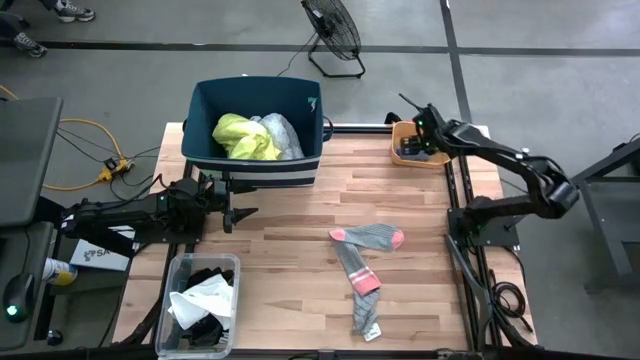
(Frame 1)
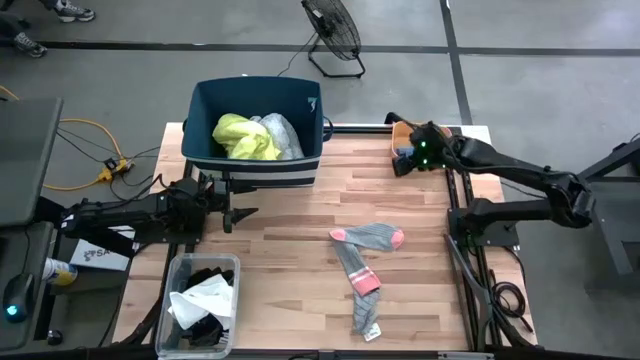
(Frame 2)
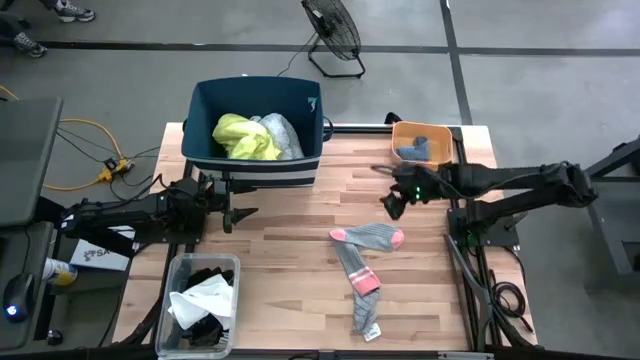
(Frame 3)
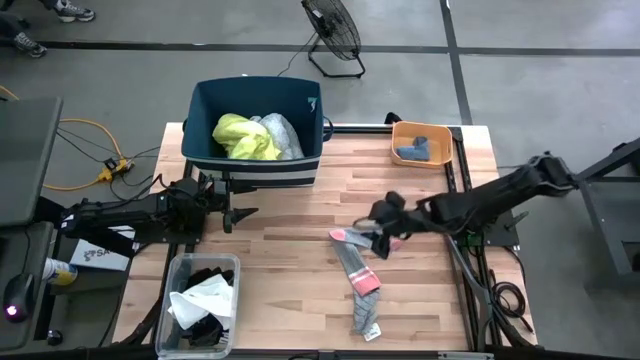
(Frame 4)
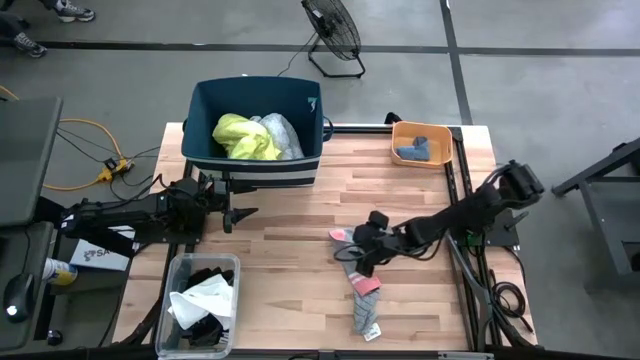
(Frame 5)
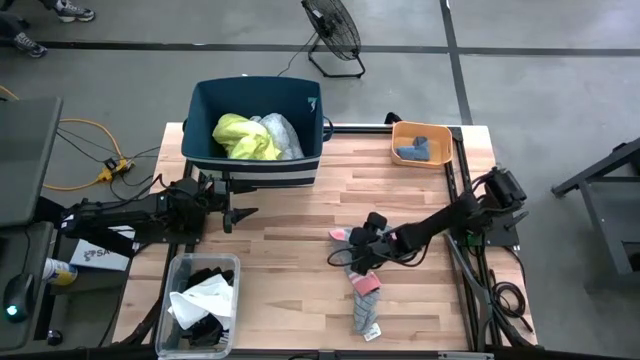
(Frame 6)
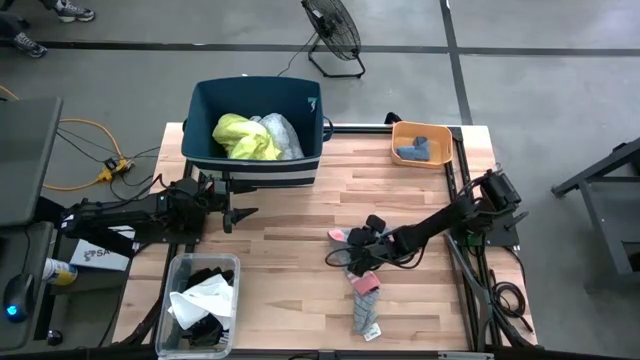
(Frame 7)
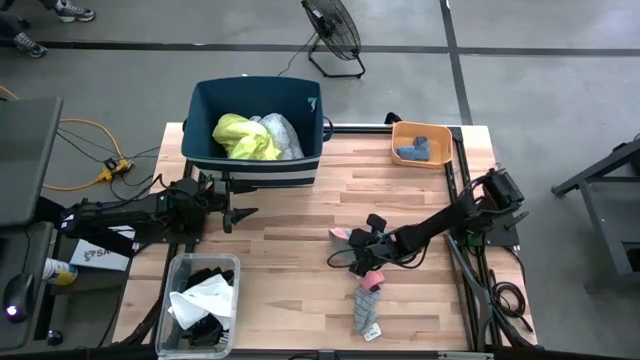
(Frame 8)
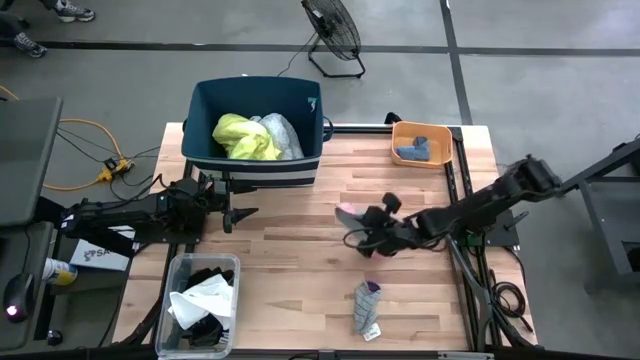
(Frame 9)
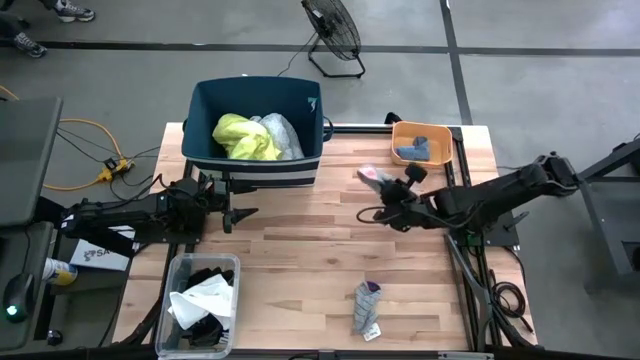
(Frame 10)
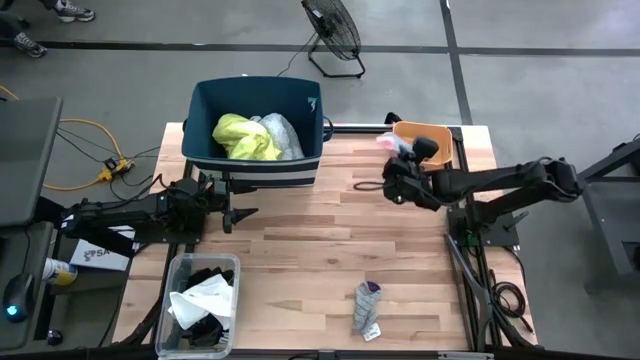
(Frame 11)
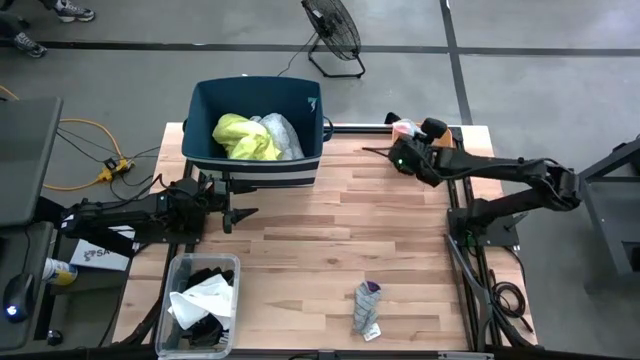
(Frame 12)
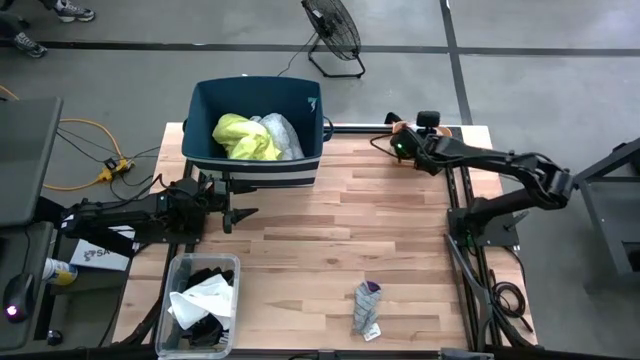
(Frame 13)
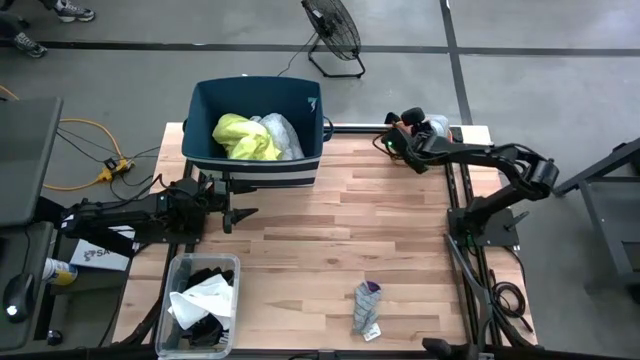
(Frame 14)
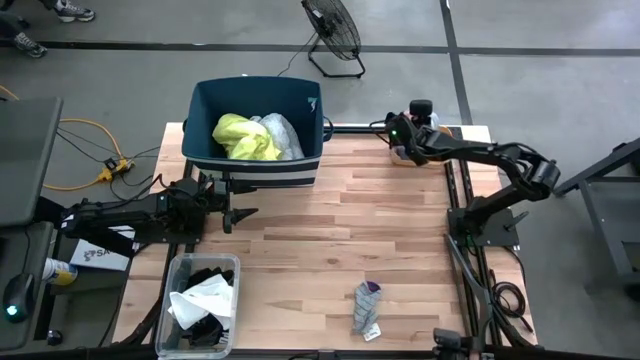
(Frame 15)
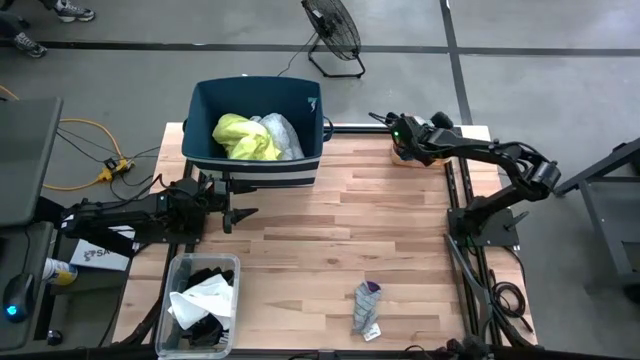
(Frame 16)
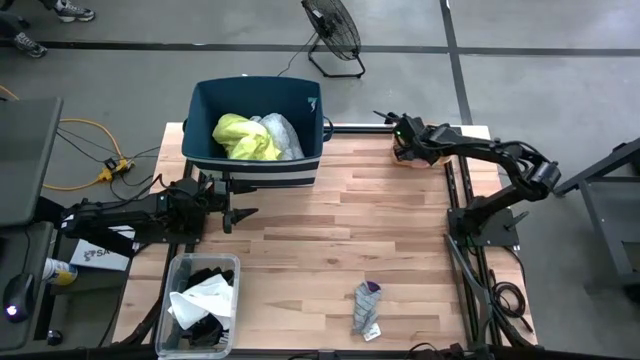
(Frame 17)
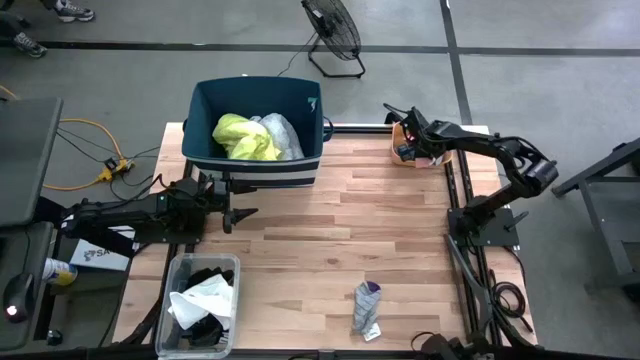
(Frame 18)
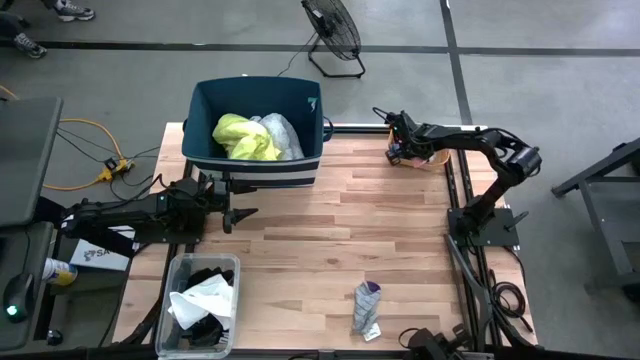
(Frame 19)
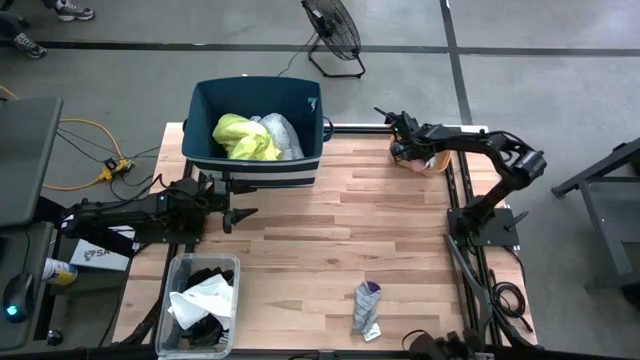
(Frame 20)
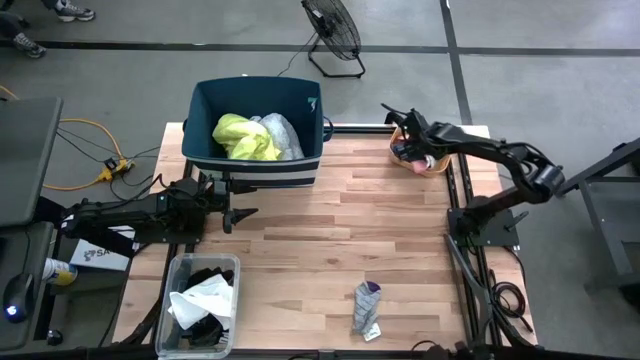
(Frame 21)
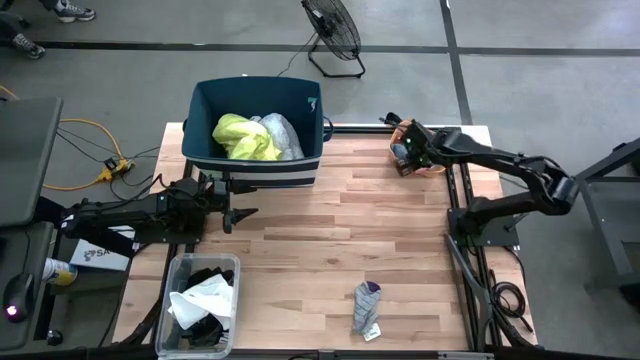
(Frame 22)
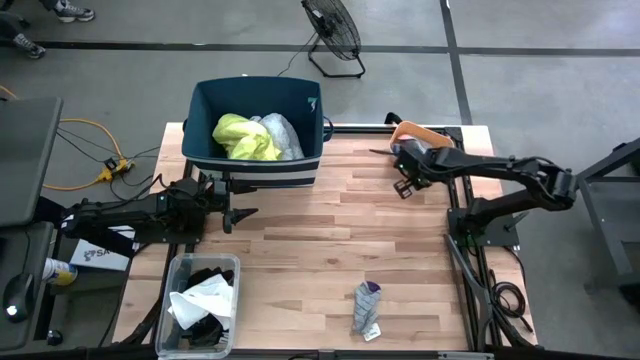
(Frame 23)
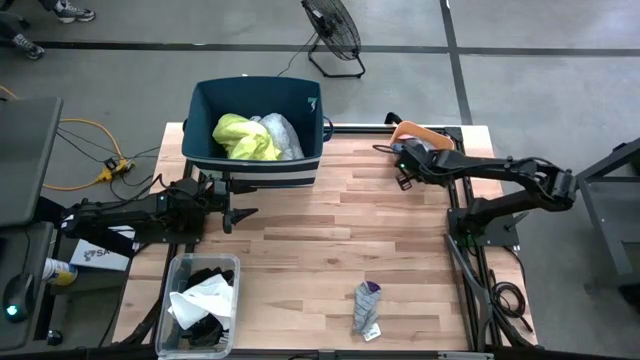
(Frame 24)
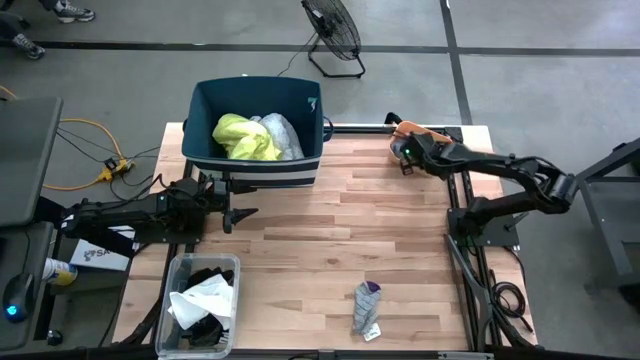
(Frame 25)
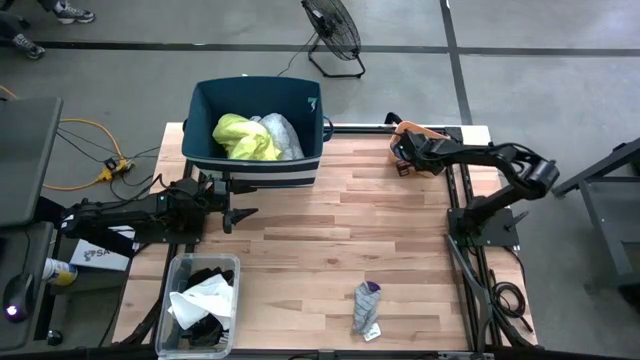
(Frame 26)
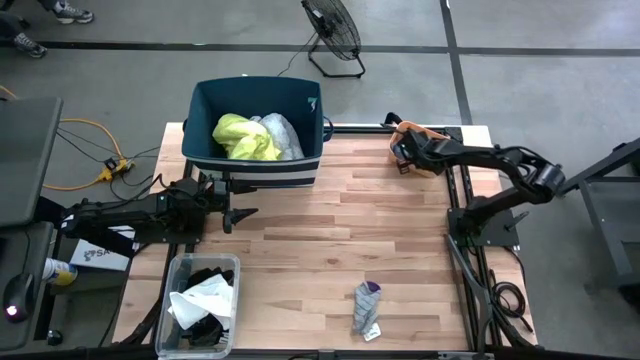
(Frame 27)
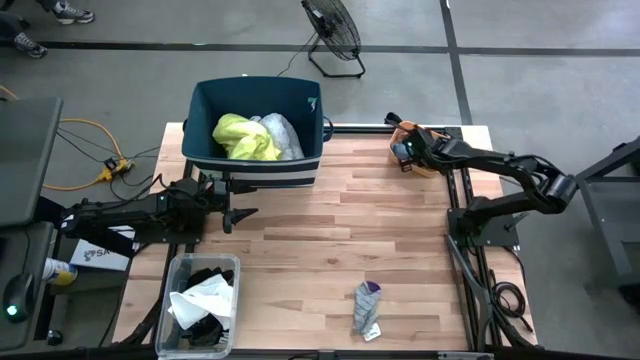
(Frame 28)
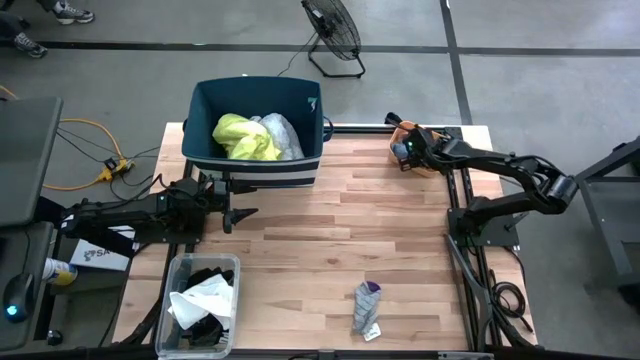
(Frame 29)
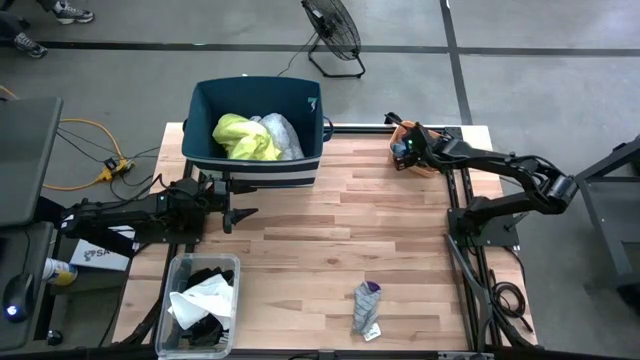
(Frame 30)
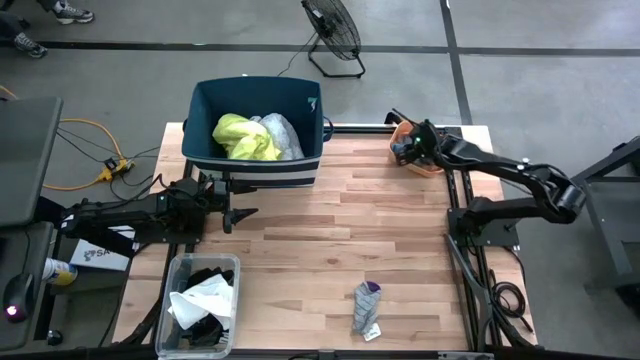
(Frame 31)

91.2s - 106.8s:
Task: Pick & Place Cloths
Put the pink sock into the orange bin

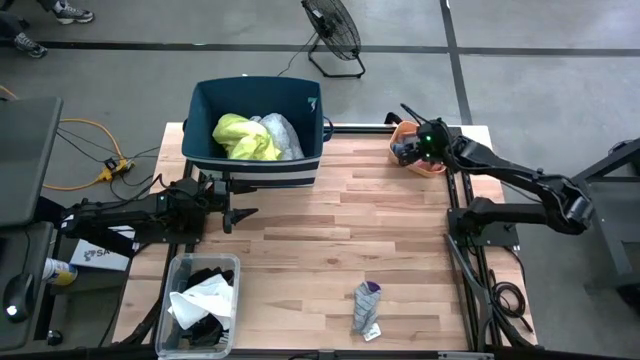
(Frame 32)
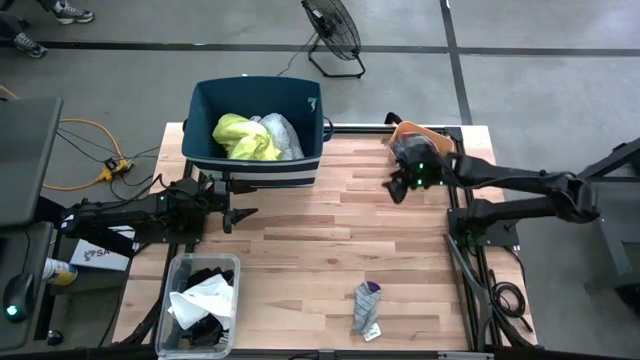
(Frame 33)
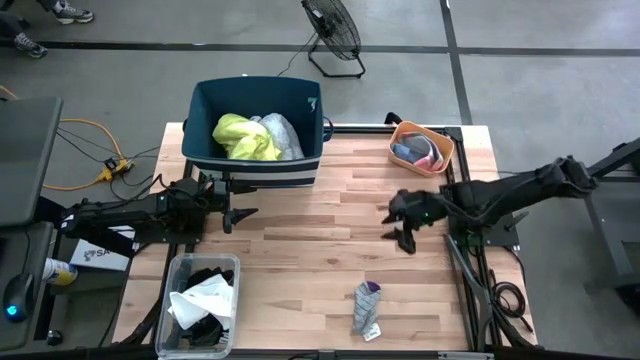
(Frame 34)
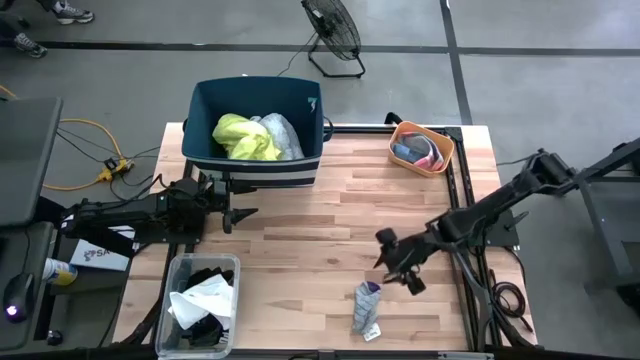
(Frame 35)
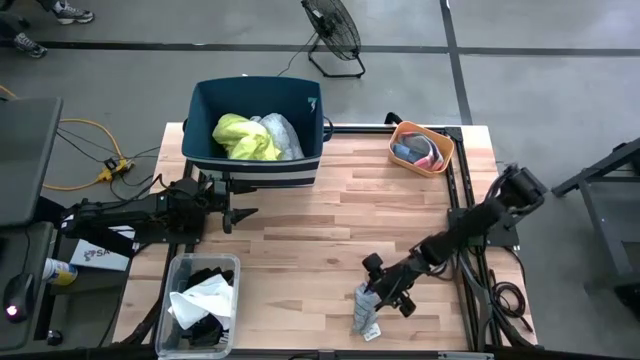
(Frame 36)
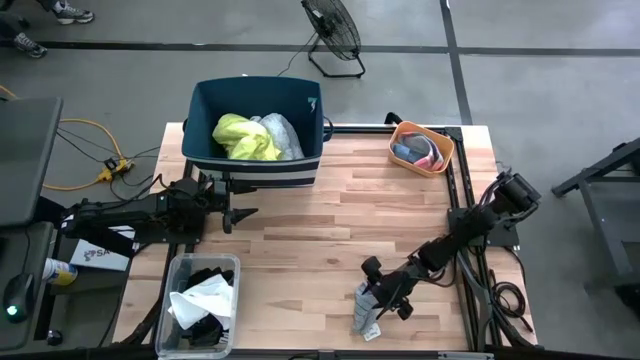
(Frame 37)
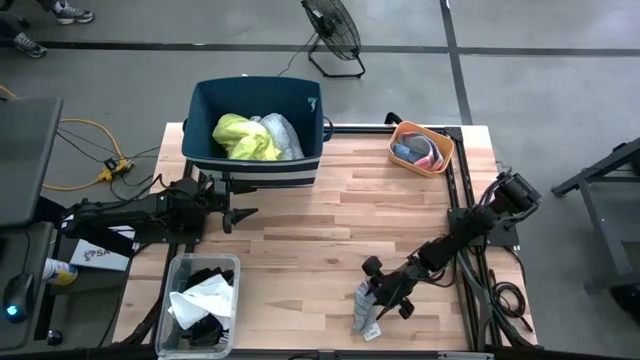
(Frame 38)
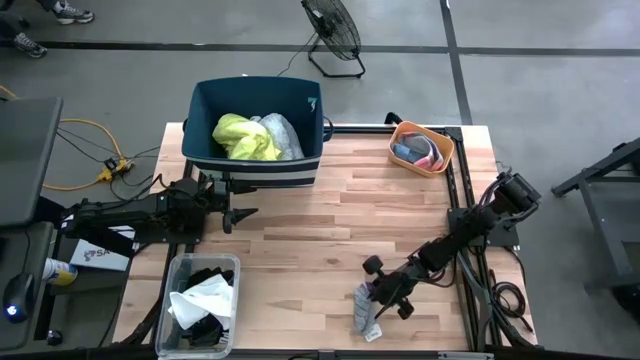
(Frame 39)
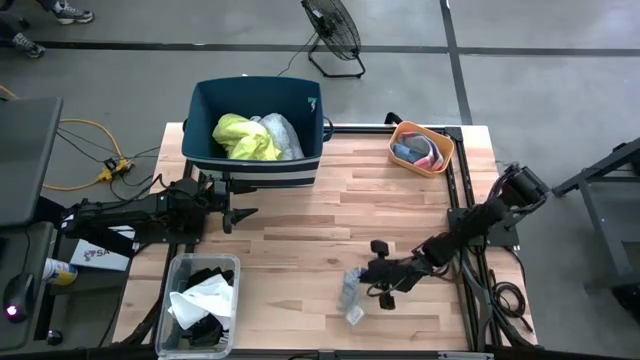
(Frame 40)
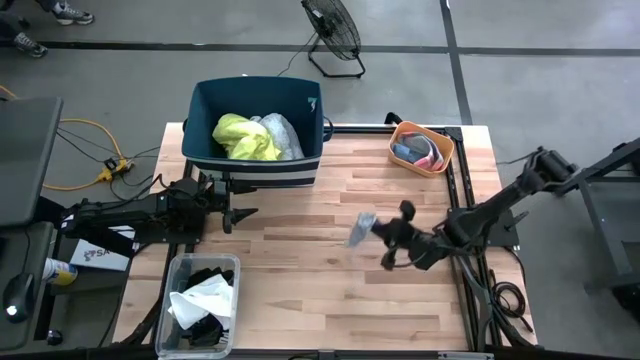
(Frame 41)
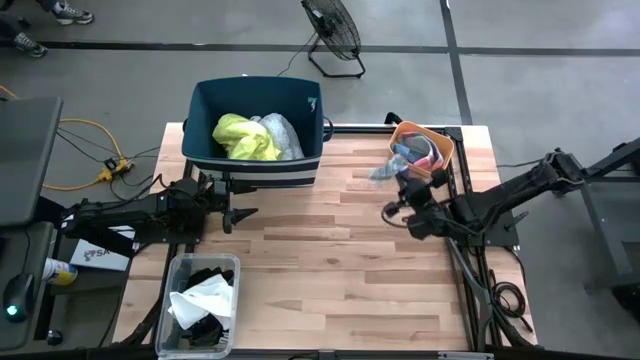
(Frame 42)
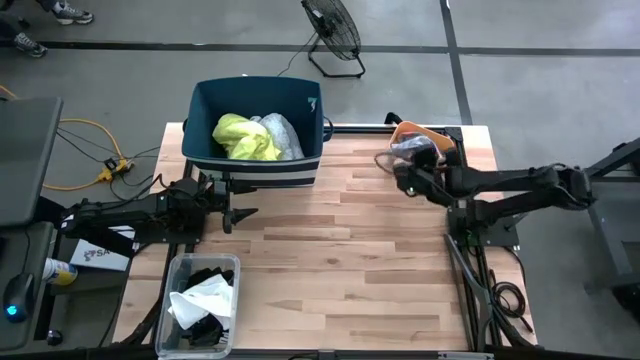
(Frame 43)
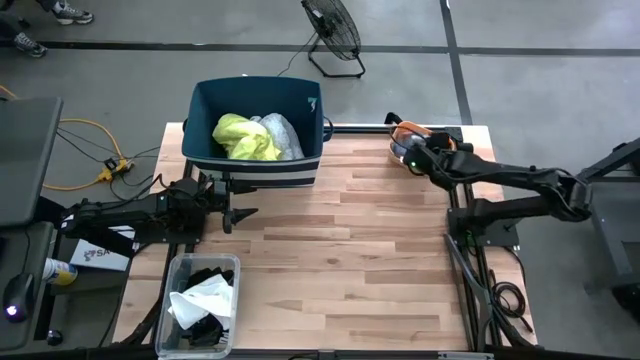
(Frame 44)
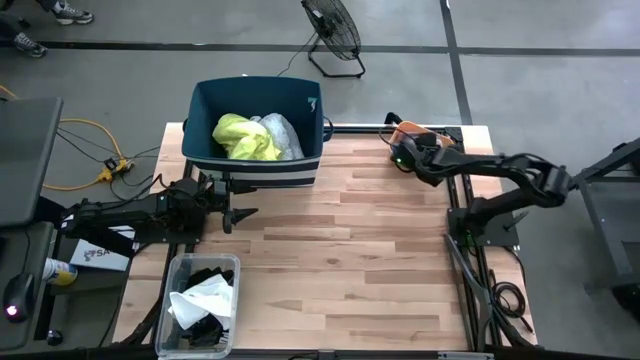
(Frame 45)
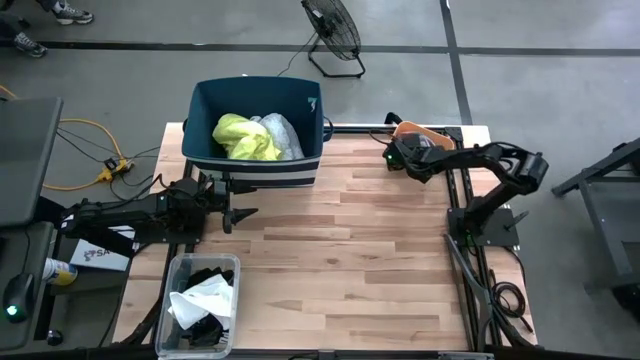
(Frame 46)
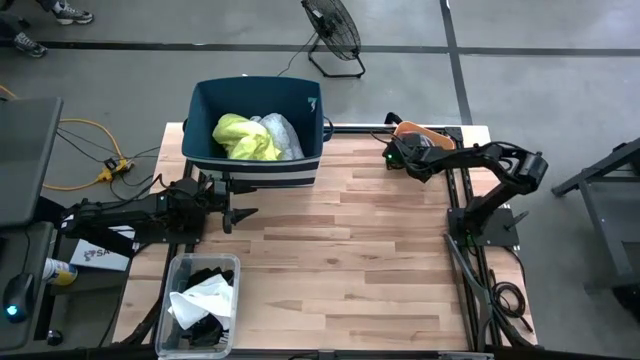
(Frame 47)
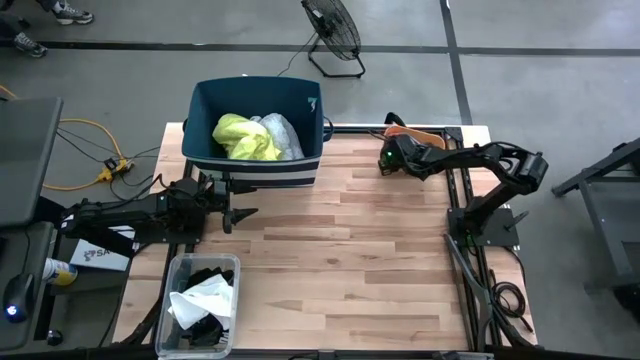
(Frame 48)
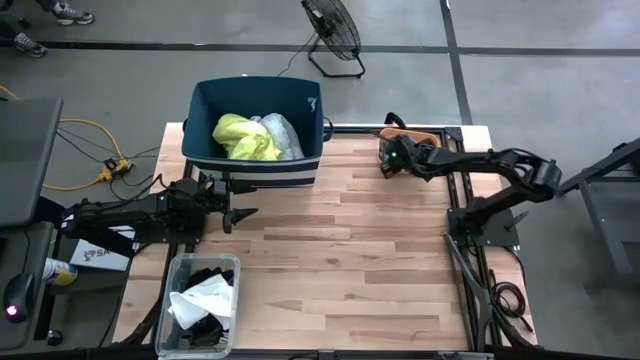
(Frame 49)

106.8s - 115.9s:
Put the gray sock into the orange bin
